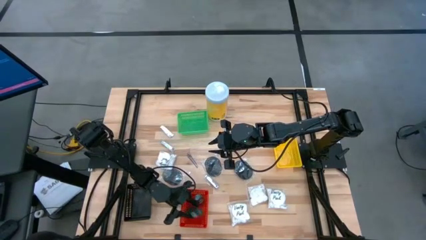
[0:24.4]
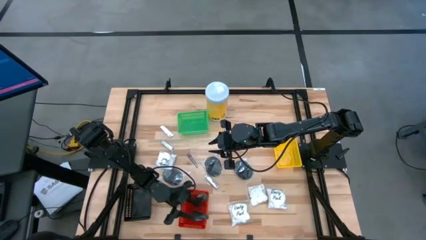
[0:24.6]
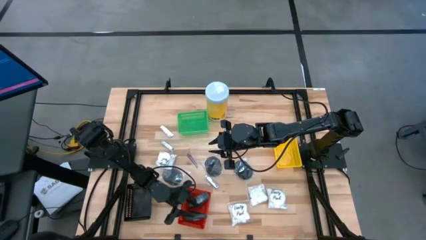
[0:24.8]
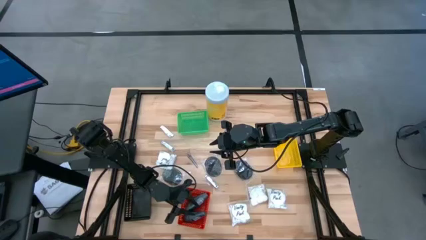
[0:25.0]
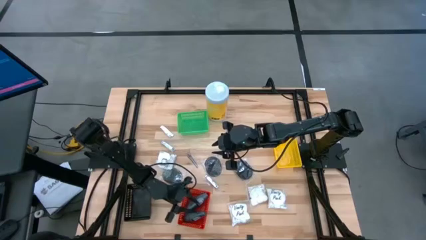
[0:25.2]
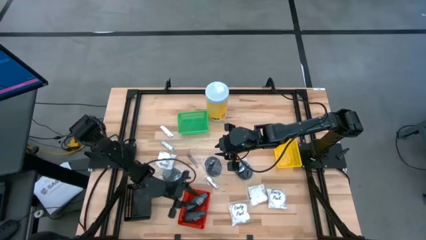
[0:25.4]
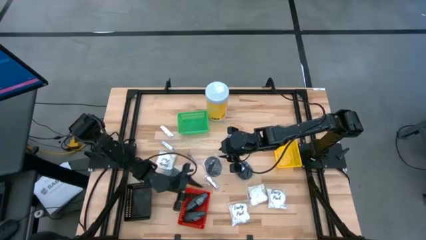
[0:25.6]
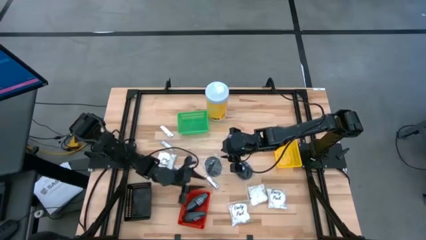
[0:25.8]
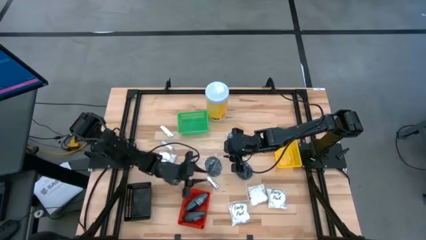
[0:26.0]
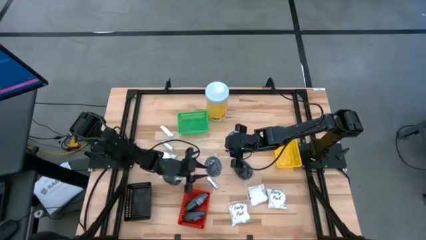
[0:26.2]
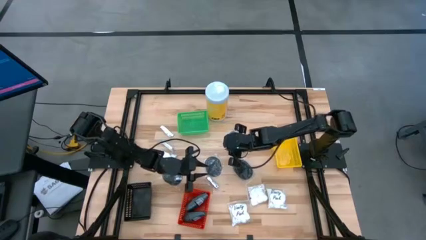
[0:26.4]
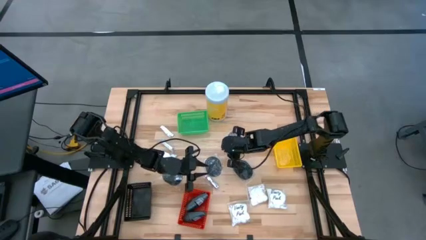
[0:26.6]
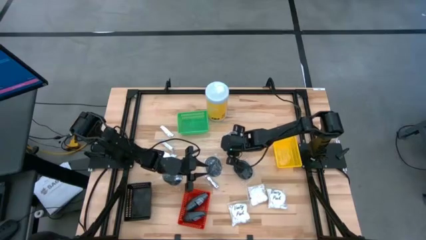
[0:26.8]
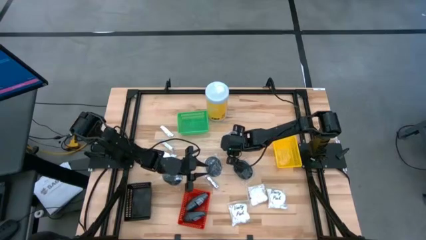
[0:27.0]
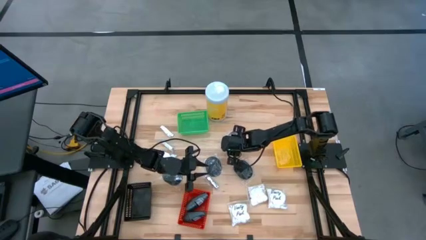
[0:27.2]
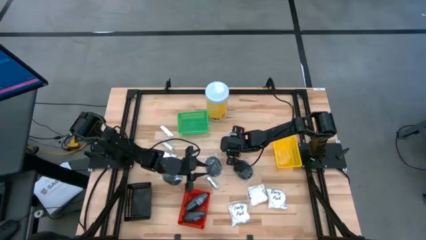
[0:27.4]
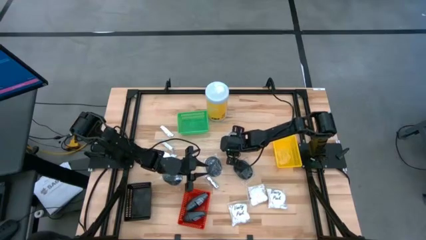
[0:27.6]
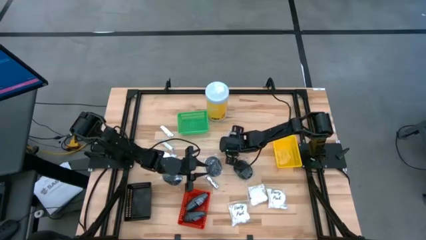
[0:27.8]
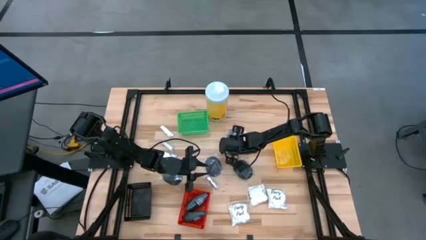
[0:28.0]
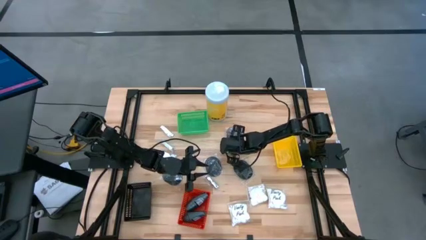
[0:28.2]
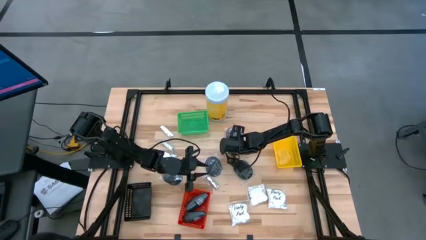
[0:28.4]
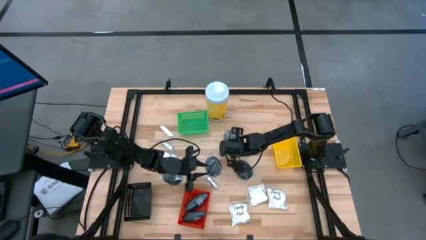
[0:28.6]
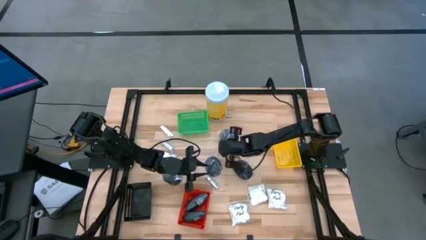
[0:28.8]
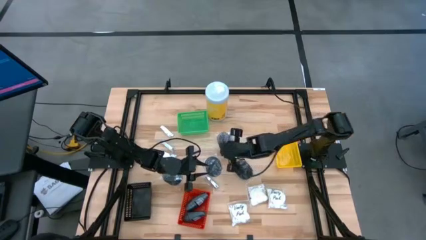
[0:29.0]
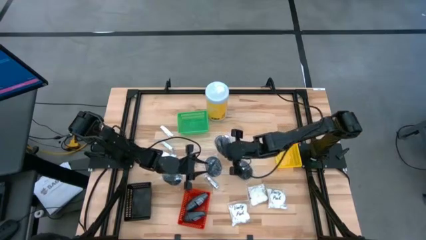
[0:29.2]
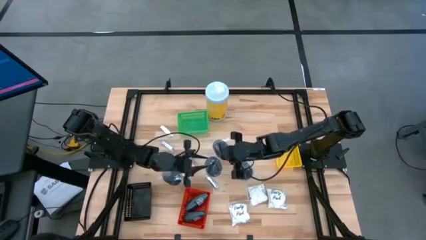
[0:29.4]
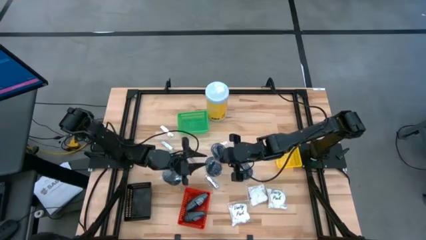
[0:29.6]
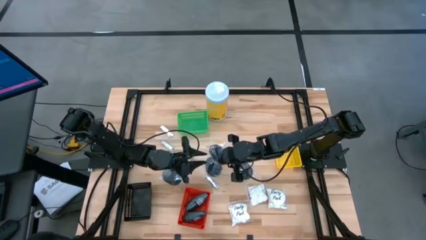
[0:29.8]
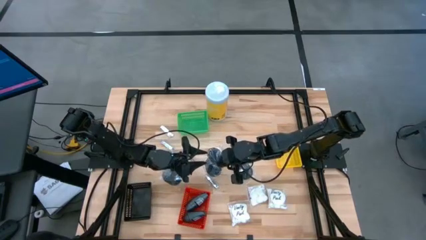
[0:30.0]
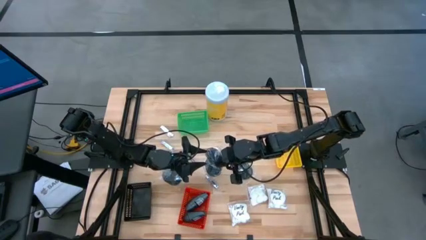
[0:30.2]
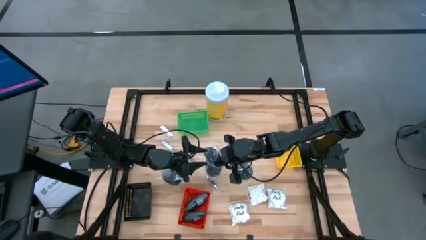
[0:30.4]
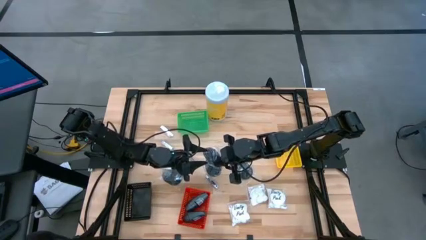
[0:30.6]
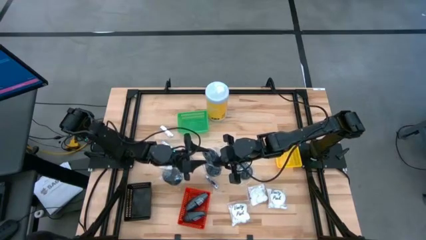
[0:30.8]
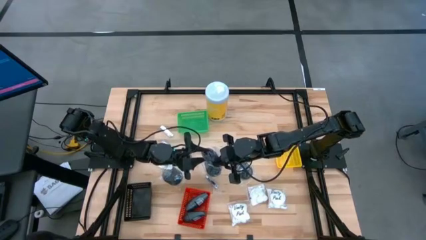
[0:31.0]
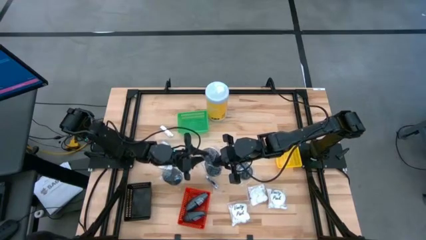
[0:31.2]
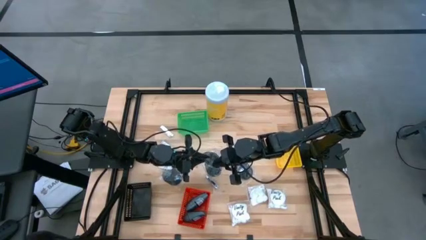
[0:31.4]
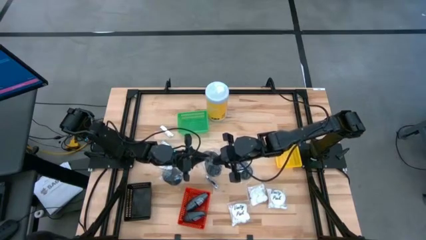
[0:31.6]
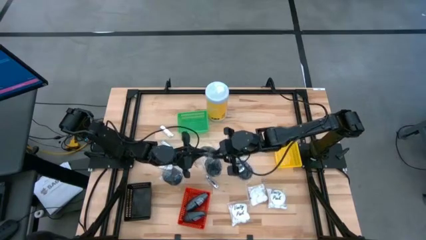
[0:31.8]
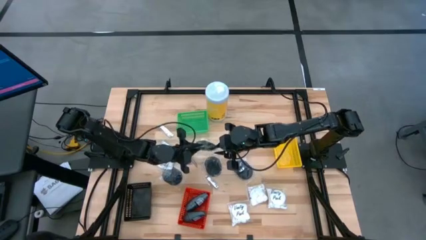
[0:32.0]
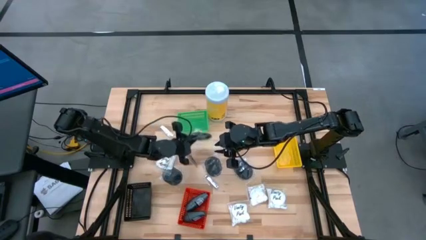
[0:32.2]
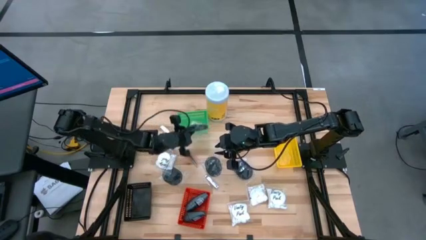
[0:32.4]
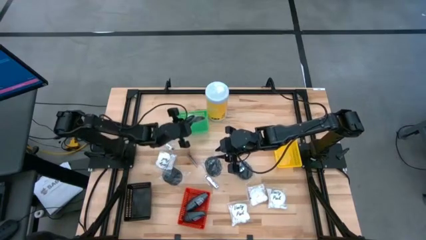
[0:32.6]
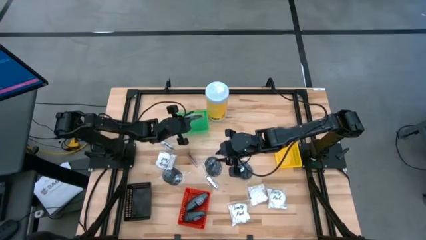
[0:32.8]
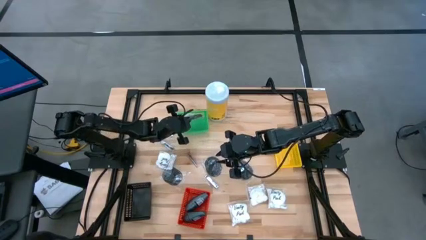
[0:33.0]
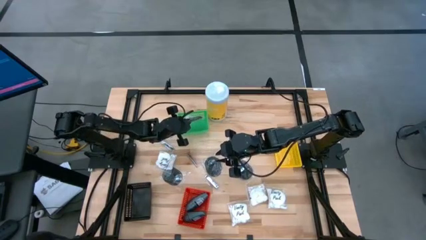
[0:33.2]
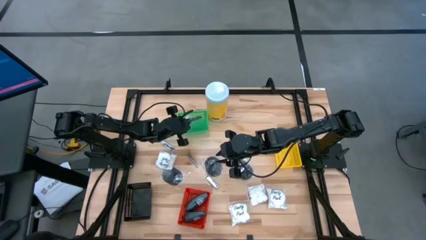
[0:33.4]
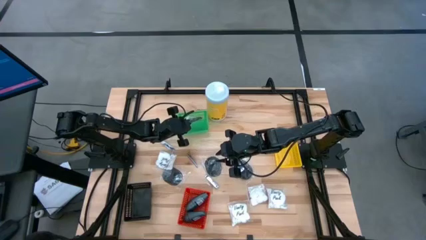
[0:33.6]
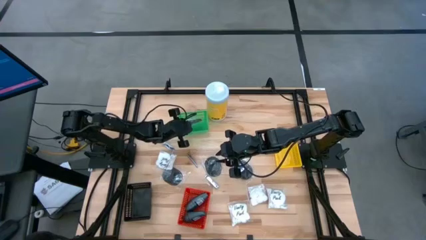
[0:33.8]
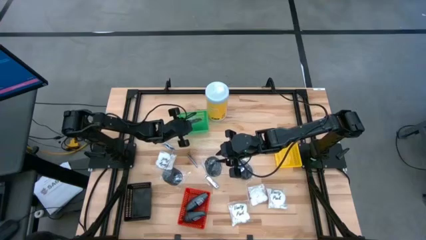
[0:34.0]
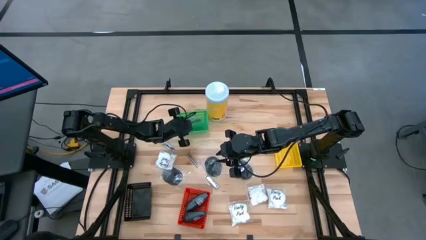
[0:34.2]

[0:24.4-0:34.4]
Task: Pick & Place Travel size toiletries
Put the black hairbrush into the green bin

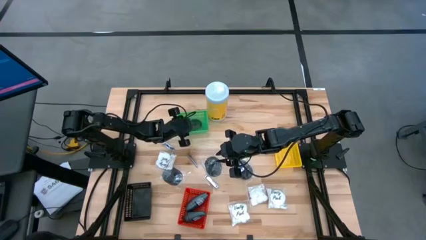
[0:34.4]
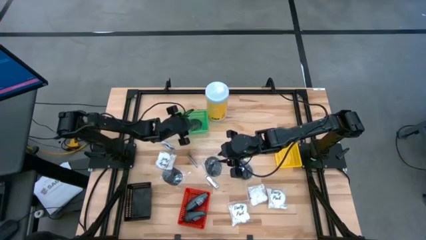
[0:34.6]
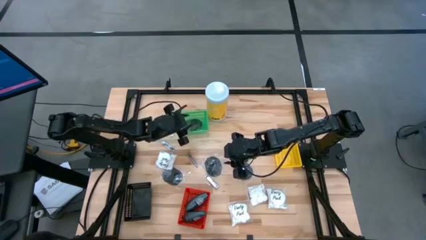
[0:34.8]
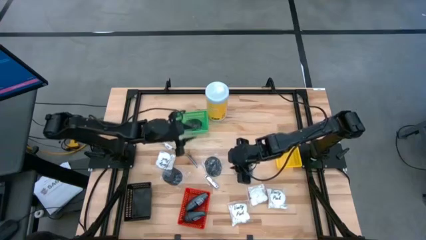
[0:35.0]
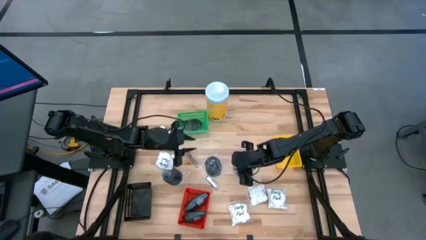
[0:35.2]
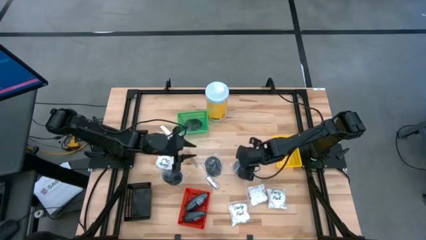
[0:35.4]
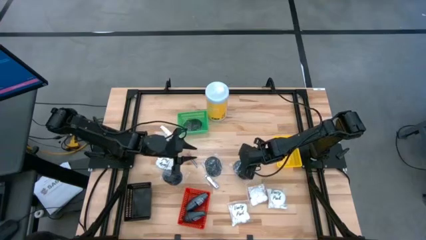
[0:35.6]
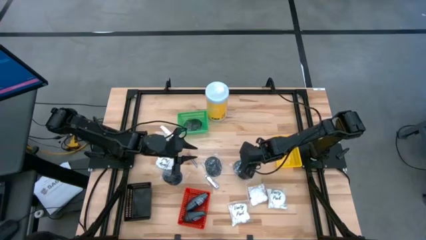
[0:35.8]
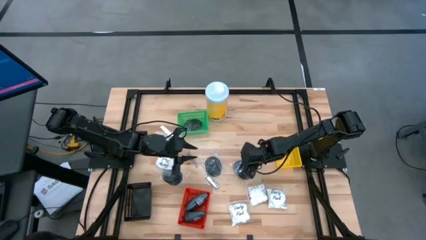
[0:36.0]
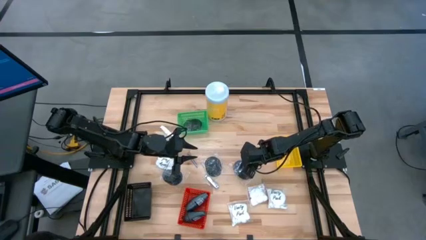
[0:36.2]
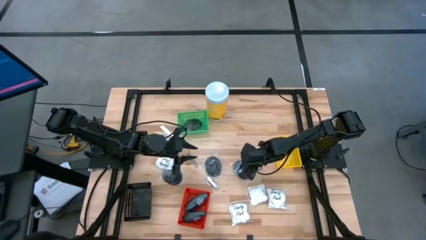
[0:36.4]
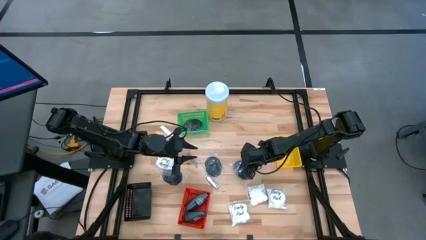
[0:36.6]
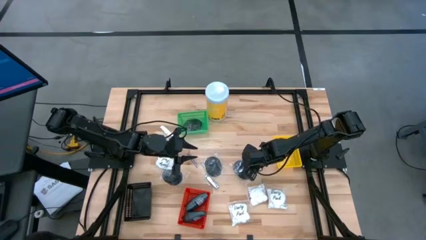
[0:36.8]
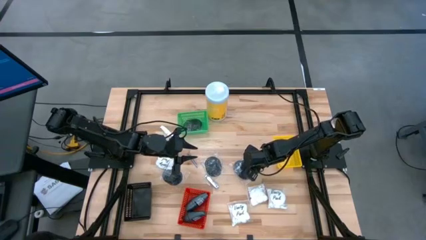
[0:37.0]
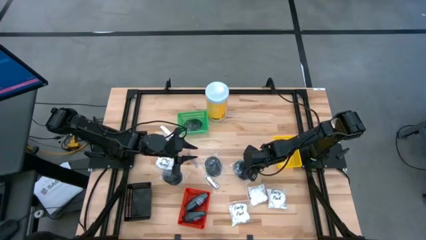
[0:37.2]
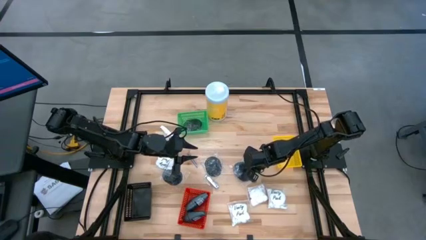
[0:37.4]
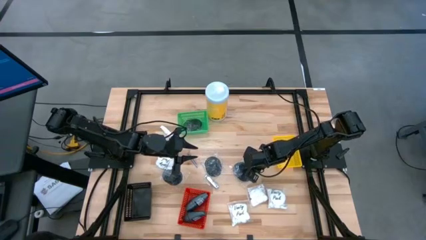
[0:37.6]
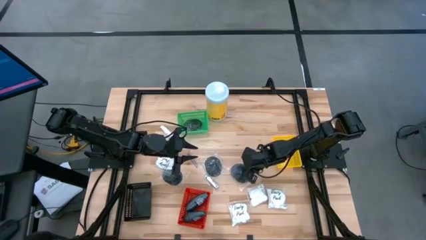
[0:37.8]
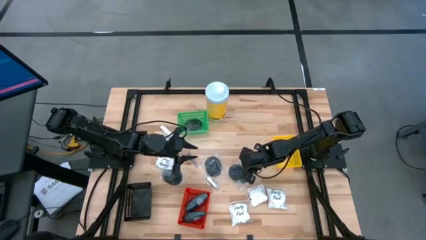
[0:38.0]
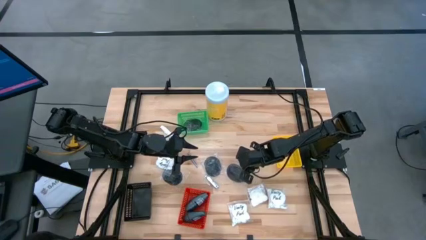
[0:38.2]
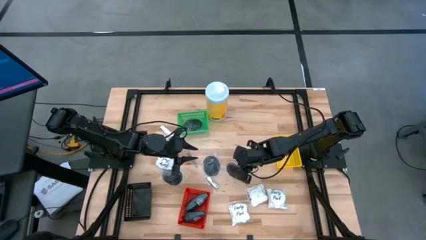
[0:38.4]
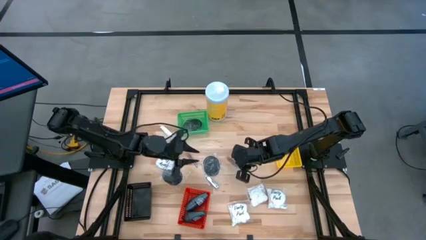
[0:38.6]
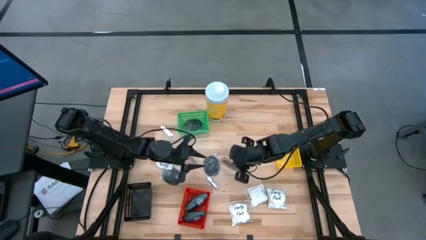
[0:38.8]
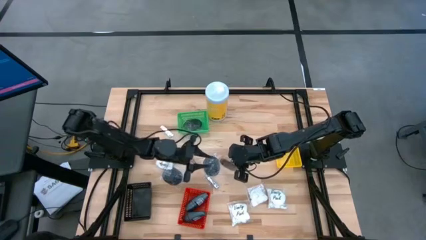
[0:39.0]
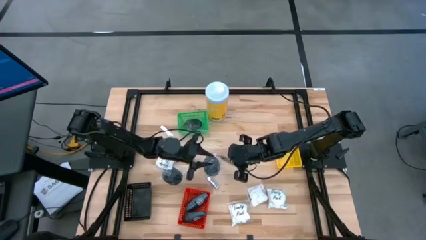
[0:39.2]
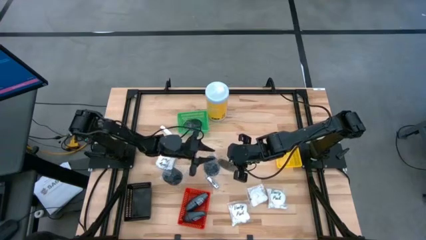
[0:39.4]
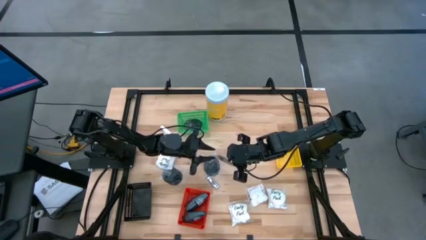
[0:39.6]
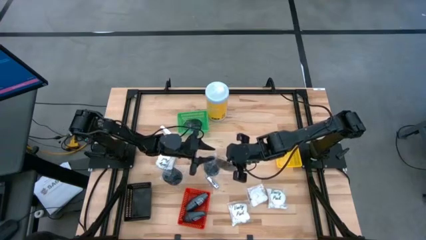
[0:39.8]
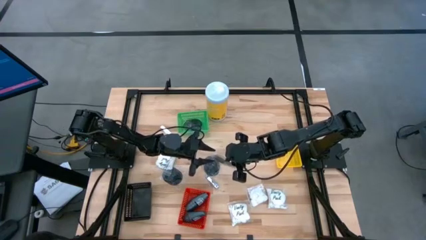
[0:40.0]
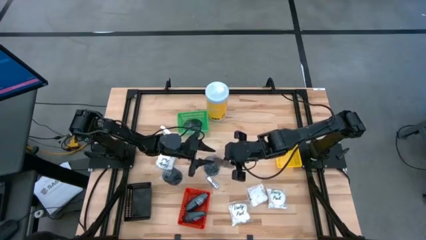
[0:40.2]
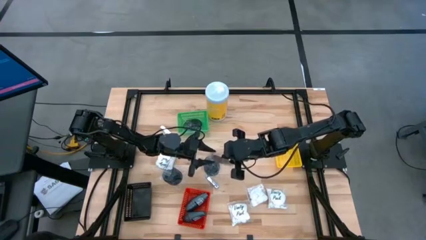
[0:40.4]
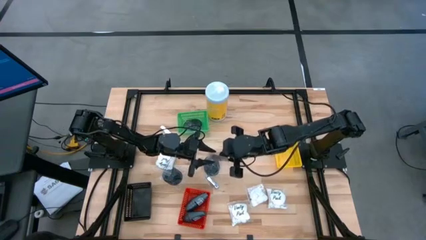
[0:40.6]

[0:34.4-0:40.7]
Put the black hairbrush into the green bin

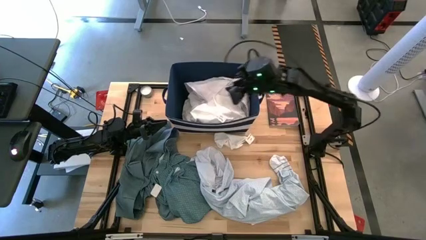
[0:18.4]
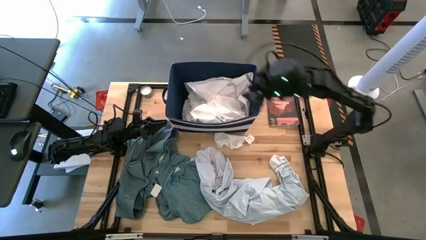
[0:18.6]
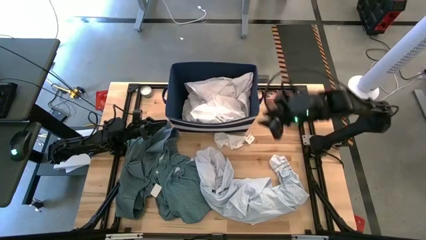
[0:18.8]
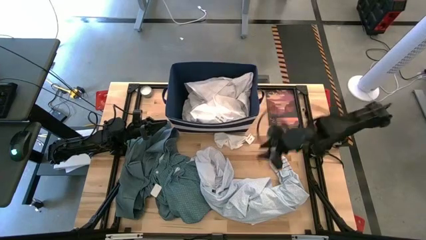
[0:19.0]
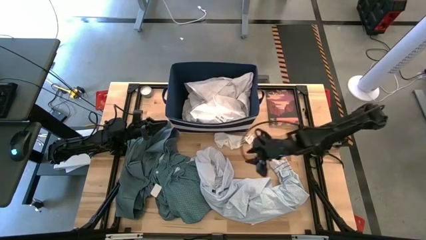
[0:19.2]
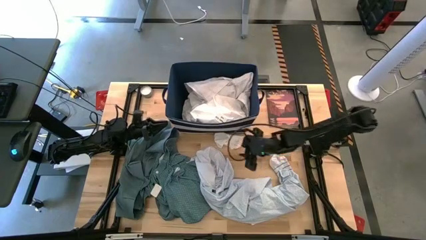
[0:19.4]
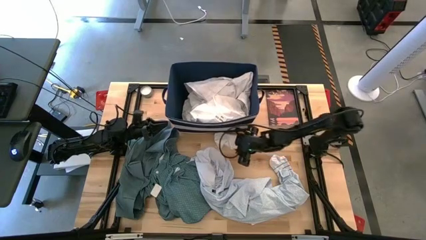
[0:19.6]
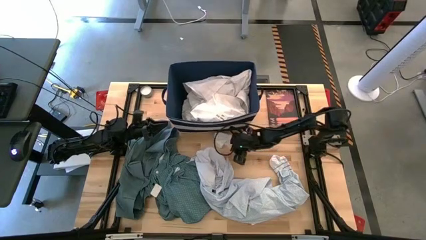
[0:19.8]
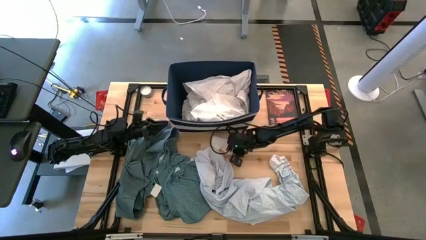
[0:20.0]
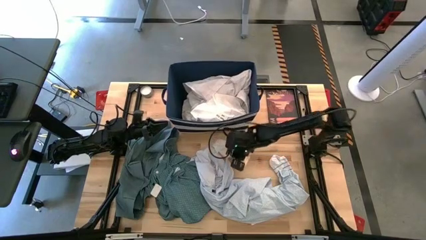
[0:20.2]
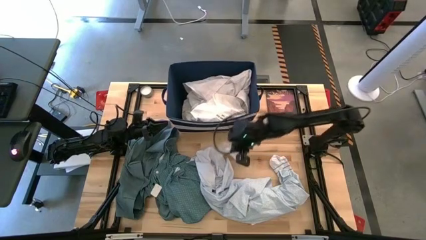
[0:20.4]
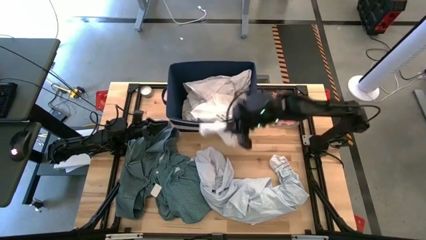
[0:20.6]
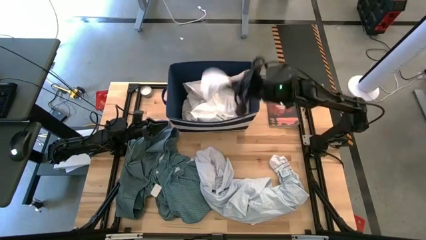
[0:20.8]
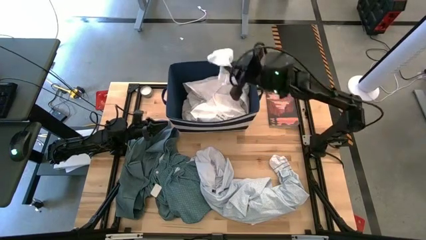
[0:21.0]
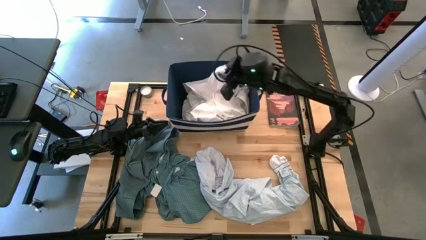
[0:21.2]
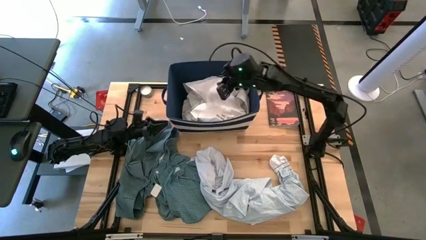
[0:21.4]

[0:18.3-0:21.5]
Task: Sort clothes
Put the white sock into the blue bin
